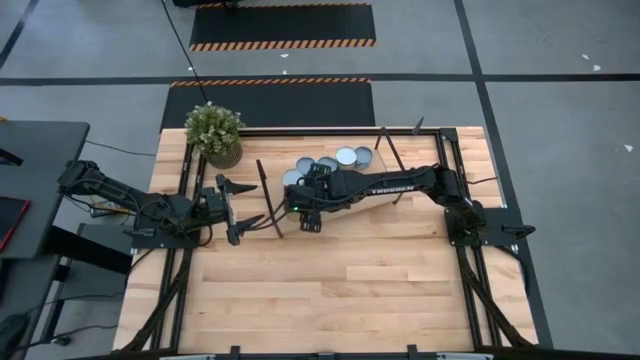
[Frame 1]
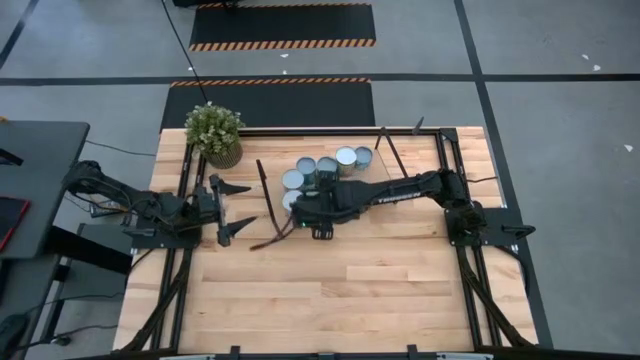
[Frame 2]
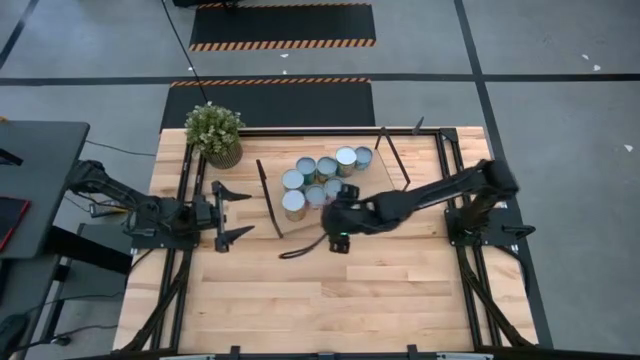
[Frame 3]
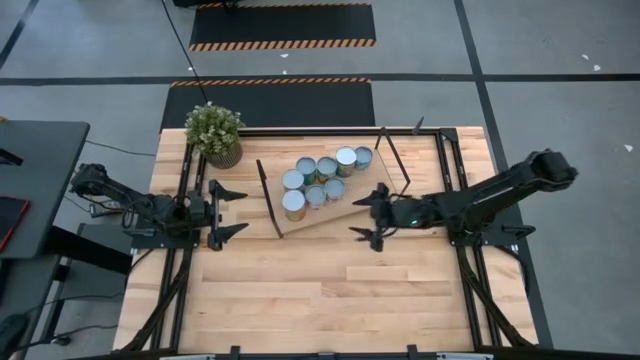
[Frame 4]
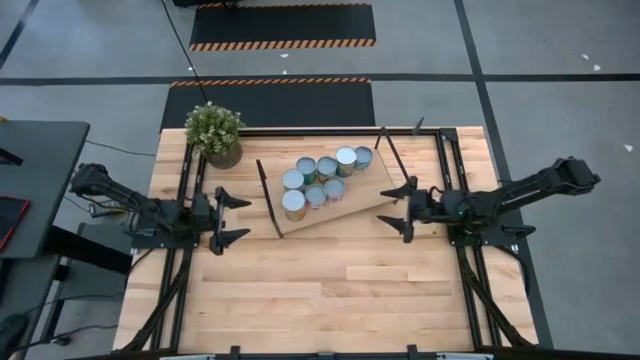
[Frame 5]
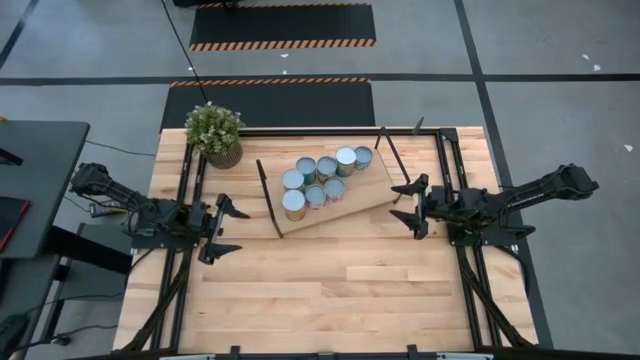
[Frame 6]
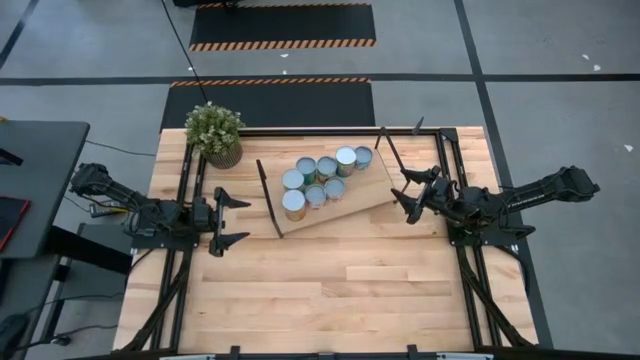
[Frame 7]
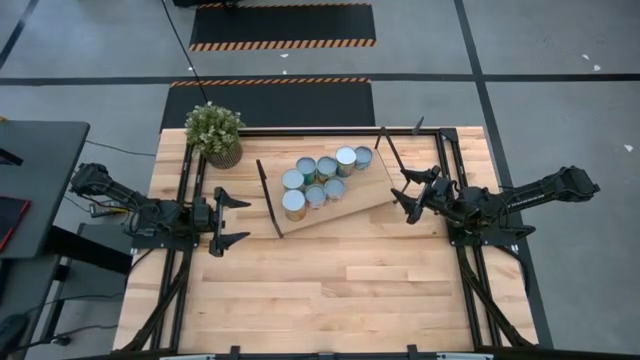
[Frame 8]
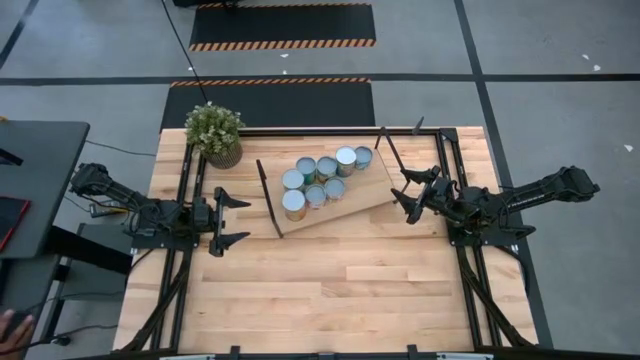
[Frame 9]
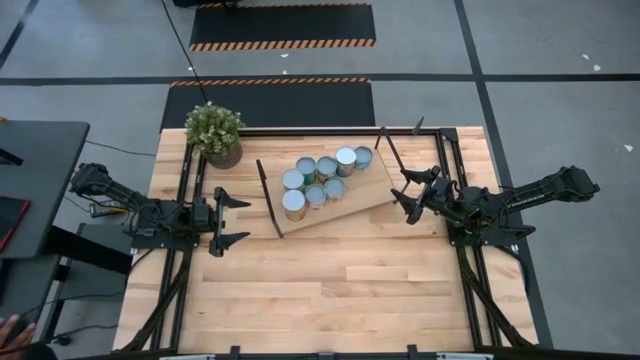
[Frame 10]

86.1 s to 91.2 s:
Task: Pick and place cans onto a shelf
Return to Home Position

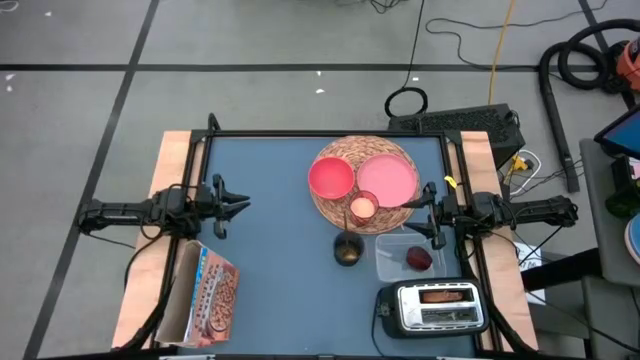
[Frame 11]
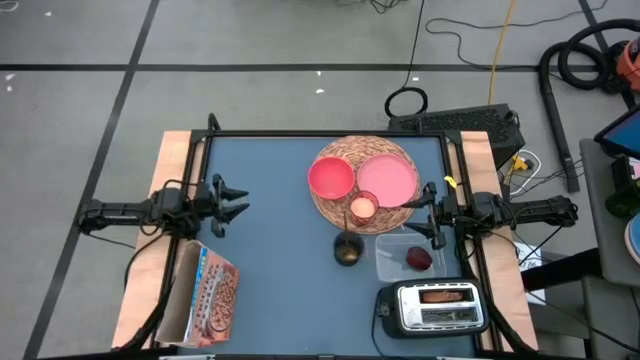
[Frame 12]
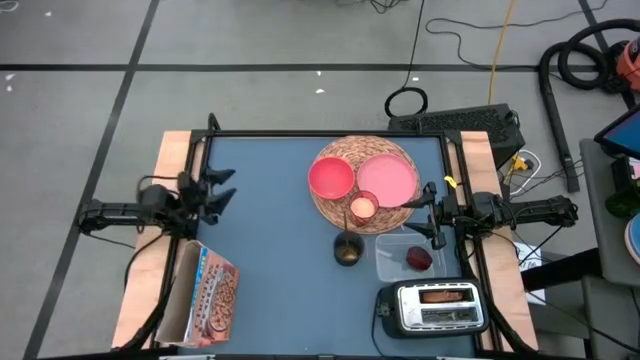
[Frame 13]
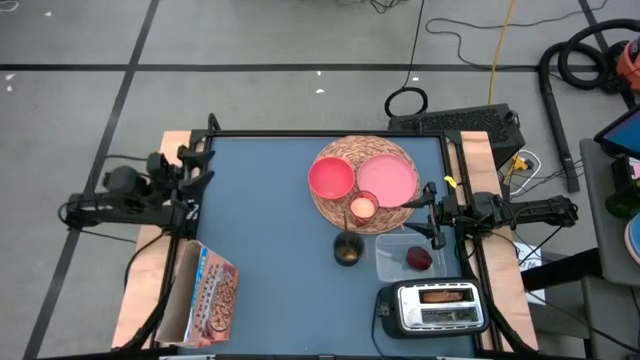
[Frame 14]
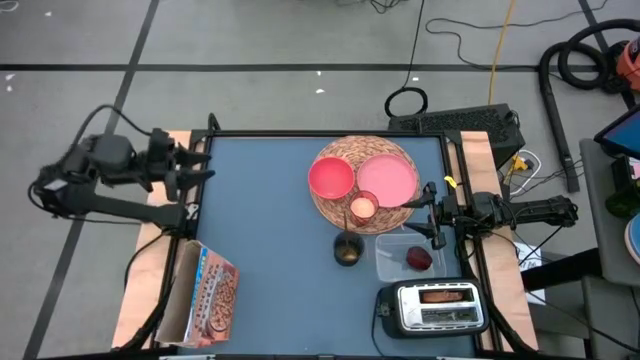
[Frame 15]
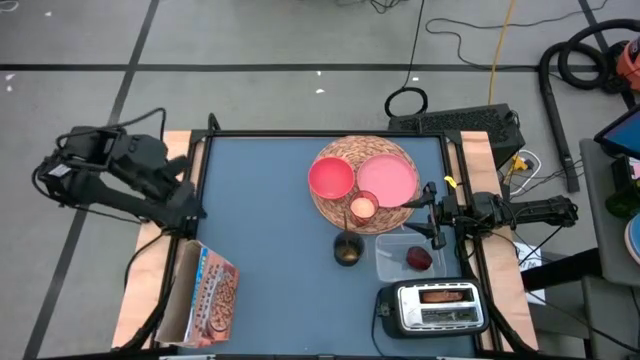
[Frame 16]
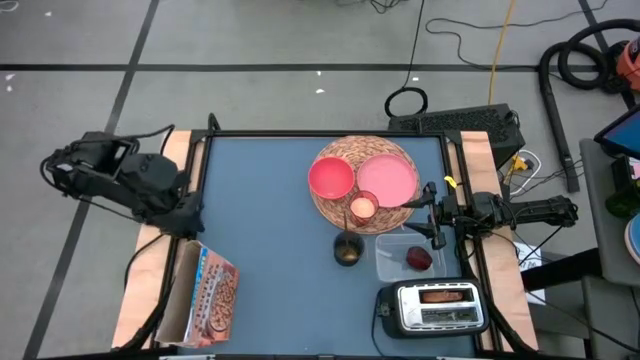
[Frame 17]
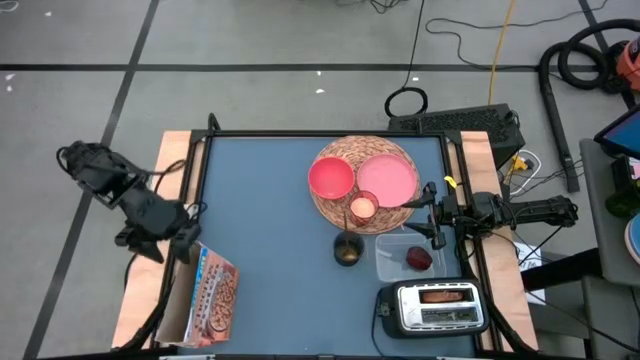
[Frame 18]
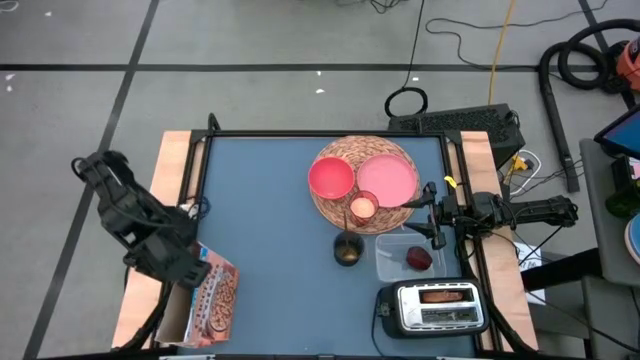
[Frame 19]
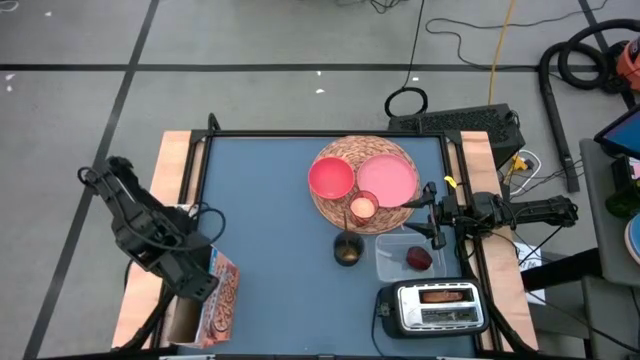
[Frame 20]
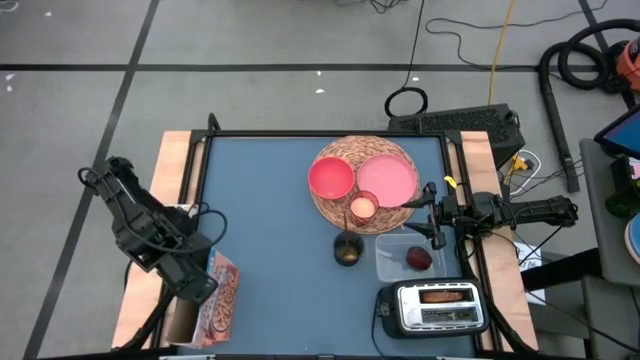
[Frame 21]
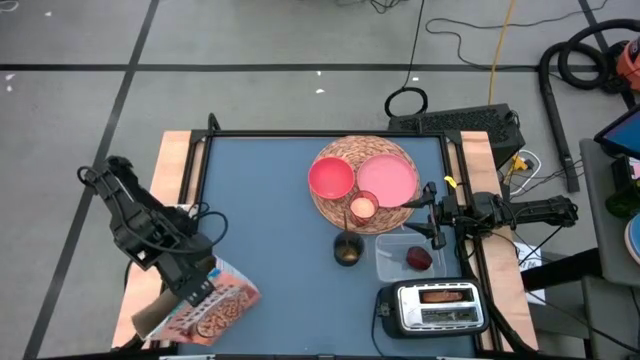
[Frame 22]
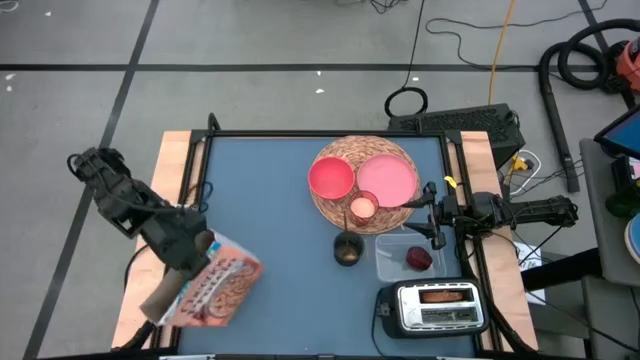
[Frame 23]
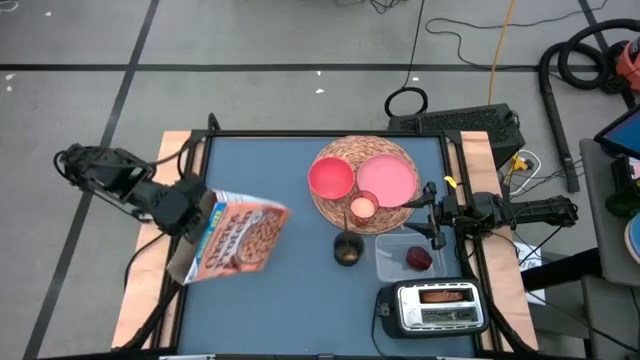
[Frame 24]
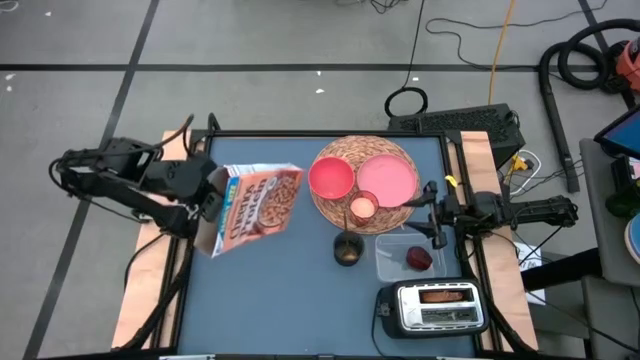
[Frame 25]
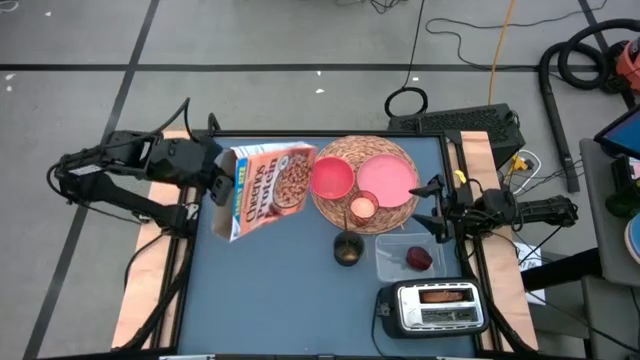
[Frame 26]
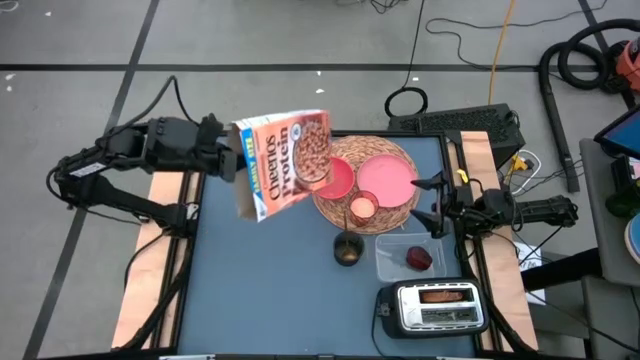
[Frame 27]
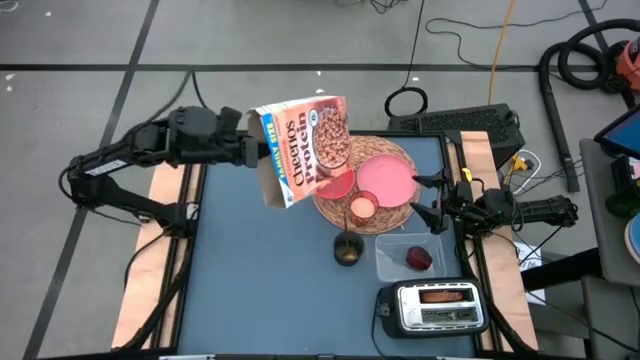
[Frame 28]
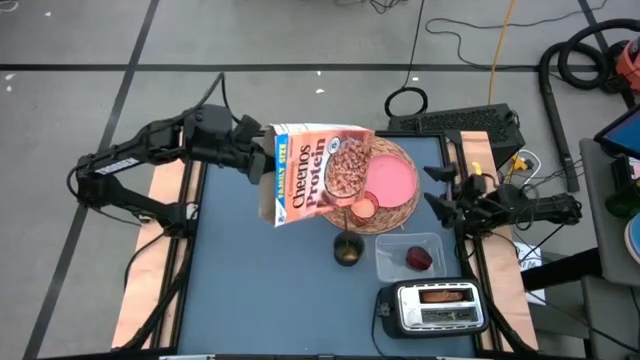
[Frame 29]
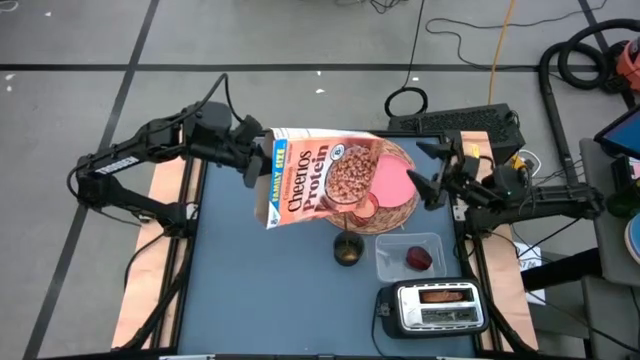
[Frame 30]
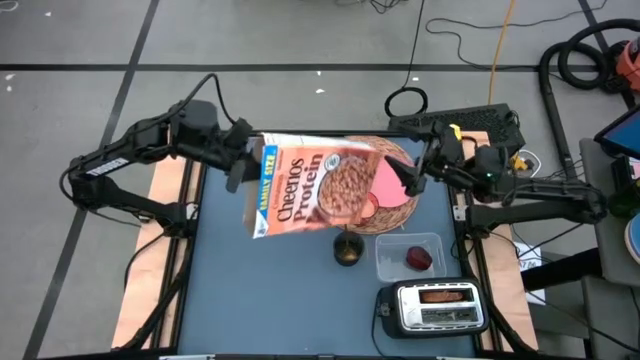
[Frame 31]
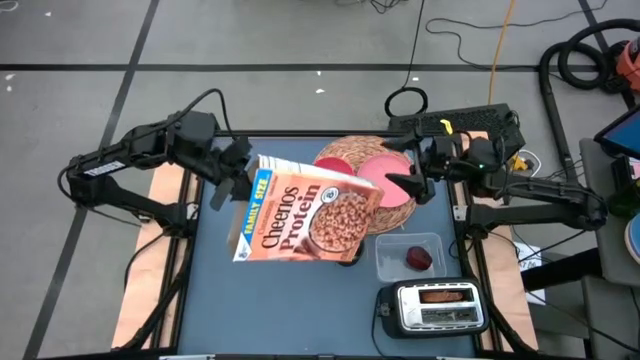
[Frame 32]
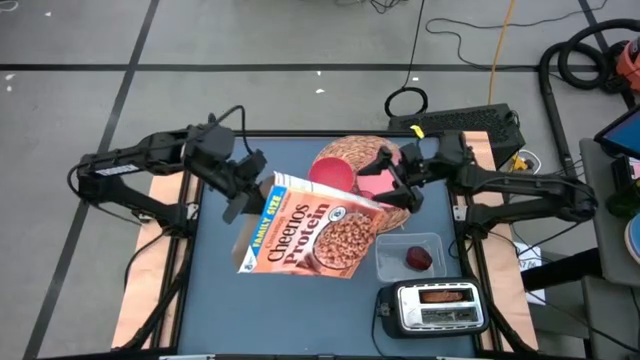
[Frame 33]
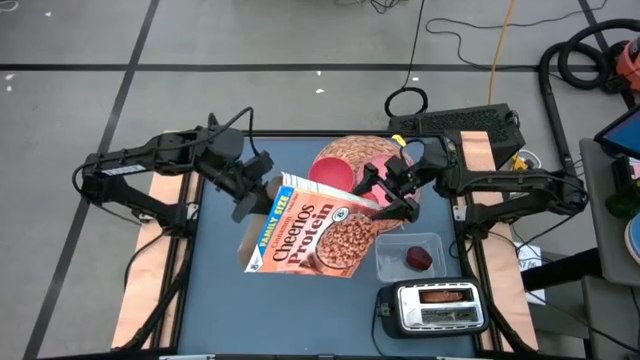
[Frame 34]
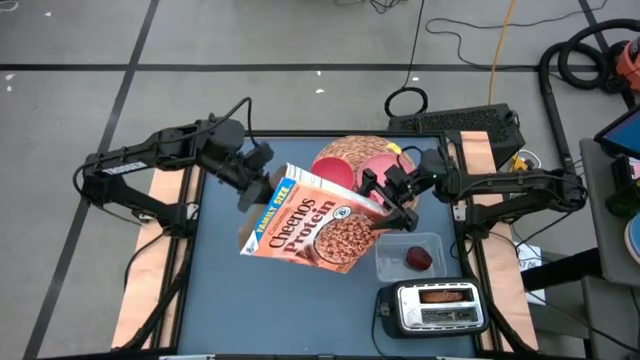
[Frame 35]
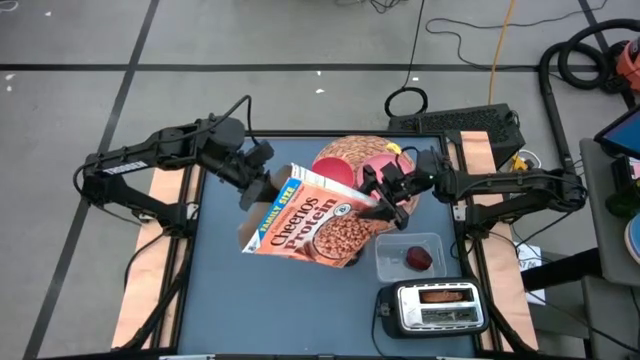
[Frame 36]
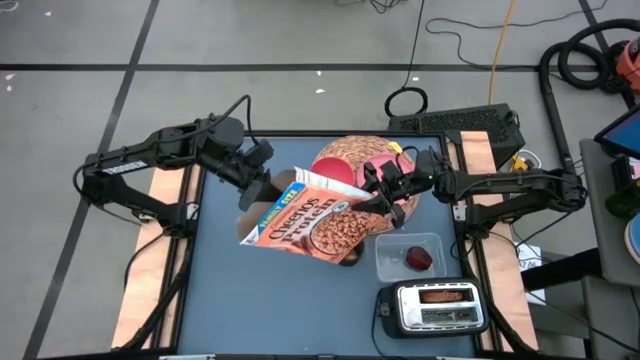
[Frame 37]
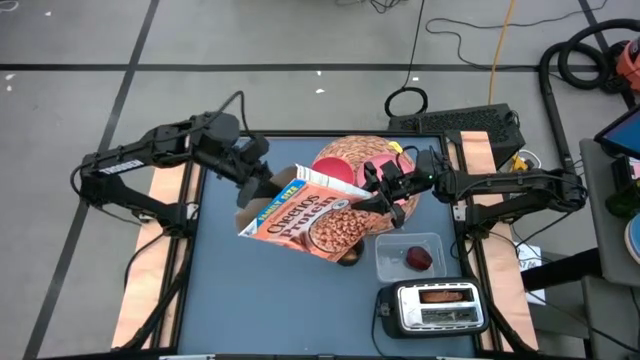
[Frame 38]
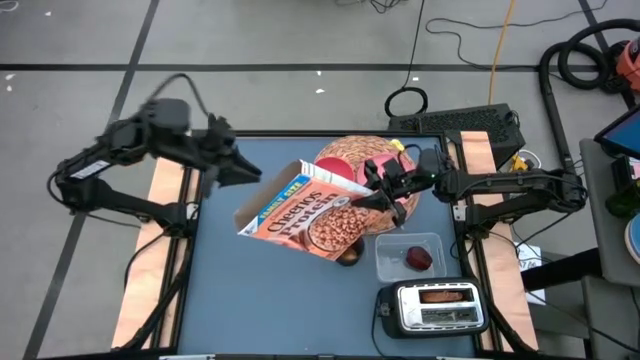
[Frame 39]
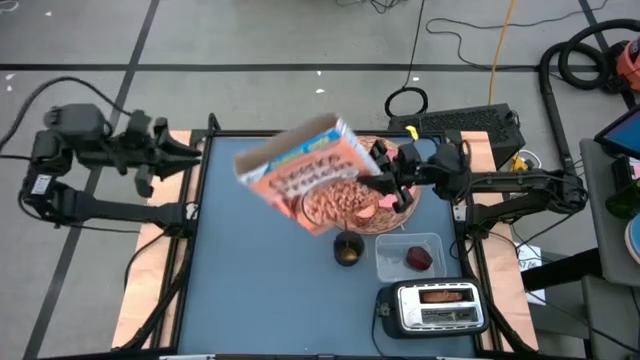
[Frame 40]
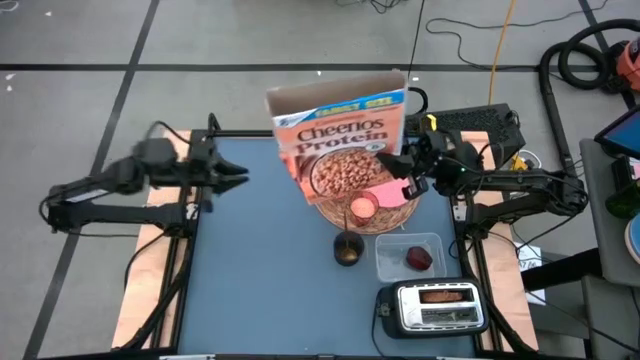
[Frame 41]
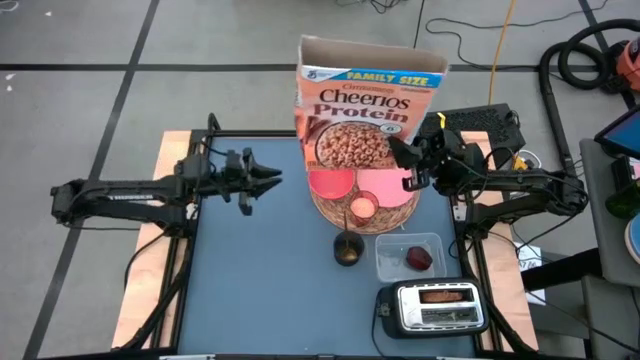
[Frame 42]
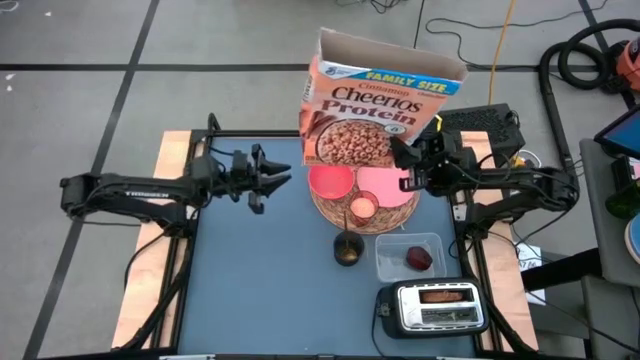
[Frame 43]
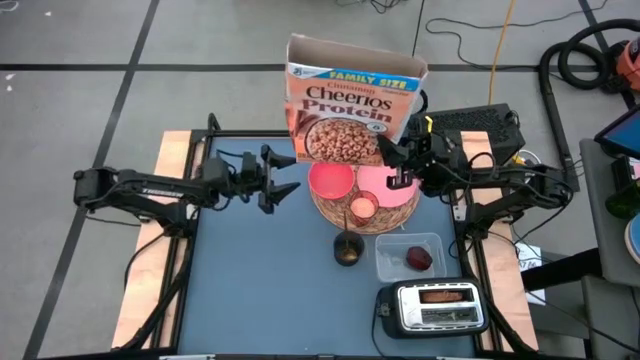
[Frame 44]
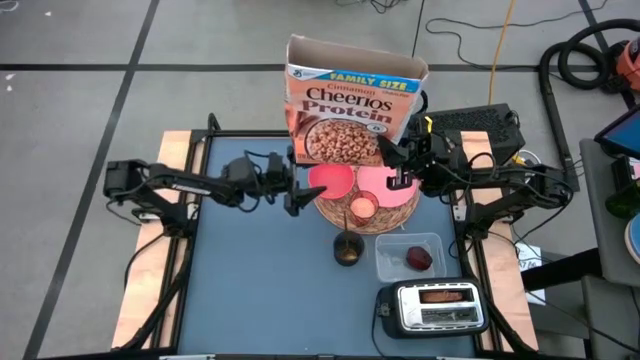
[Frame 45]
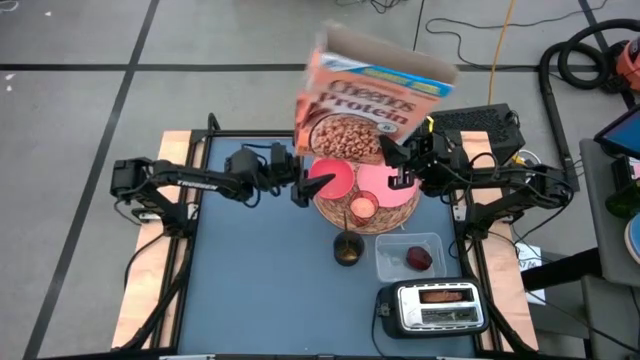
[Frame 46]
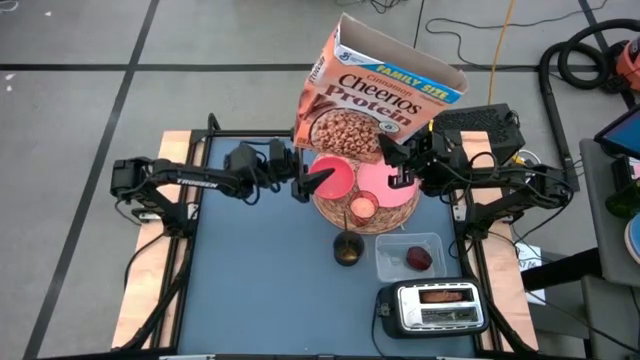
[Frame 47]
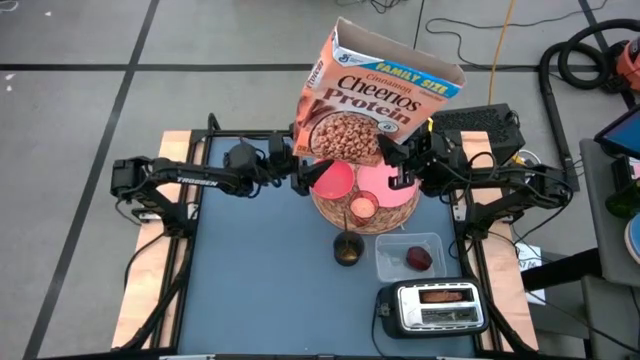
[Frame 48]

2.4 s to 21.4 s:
Task: Arrange a breakfast setting
Pour the cereal from the cereal box into the red bowl
